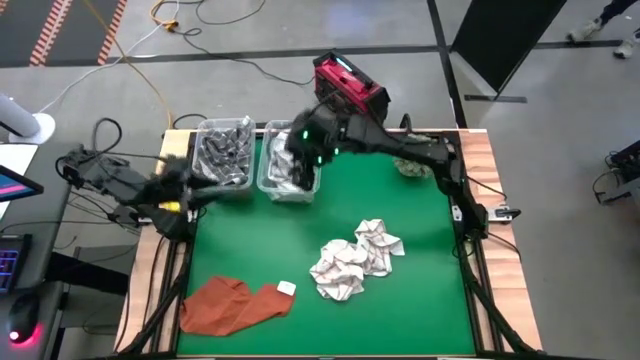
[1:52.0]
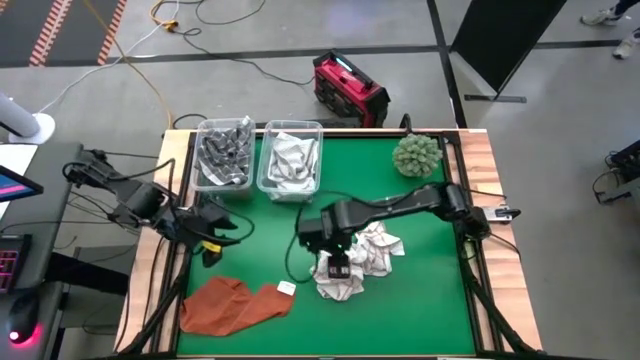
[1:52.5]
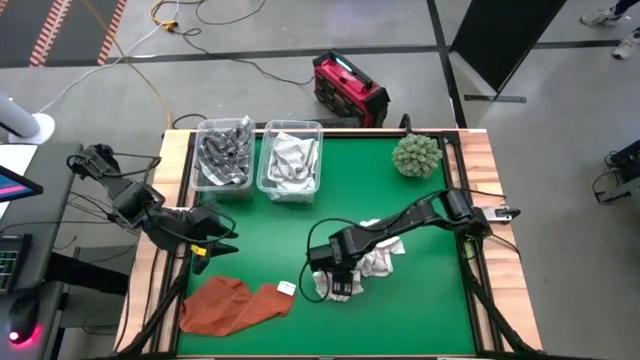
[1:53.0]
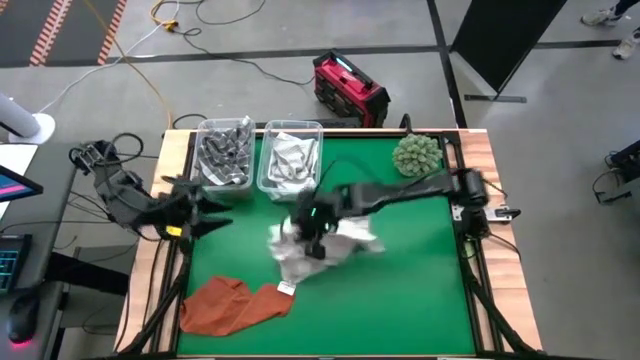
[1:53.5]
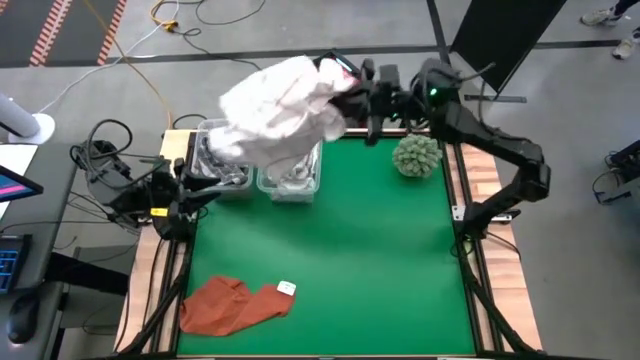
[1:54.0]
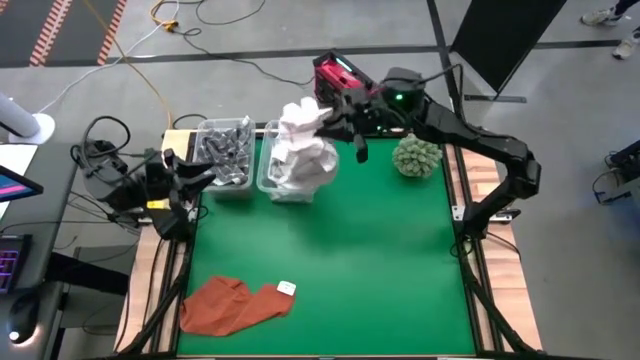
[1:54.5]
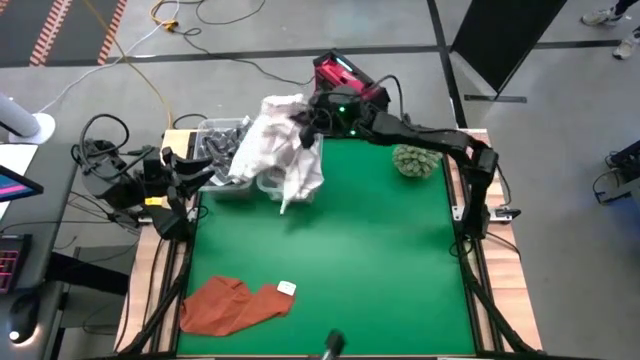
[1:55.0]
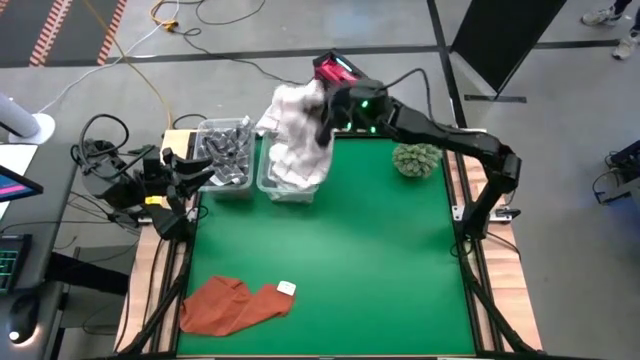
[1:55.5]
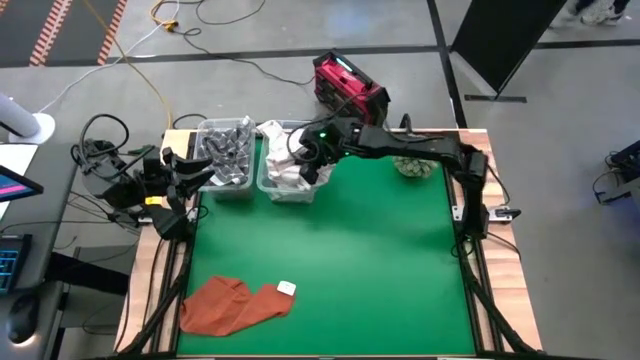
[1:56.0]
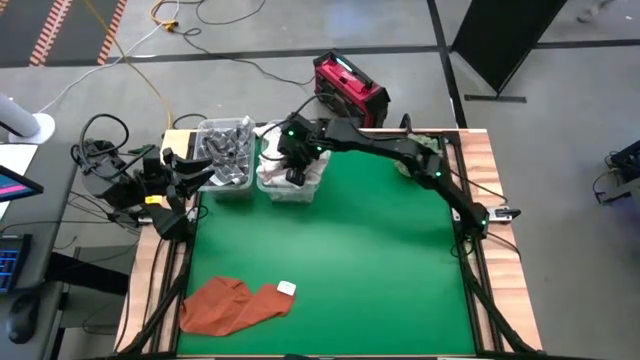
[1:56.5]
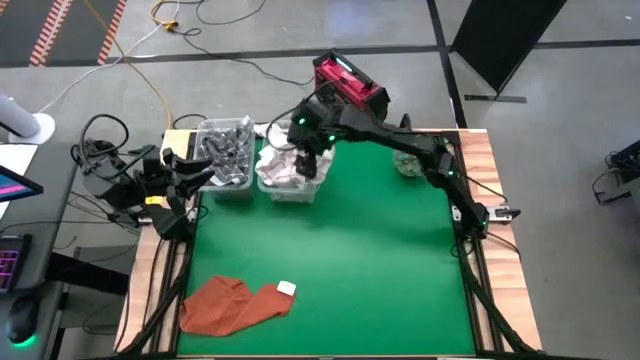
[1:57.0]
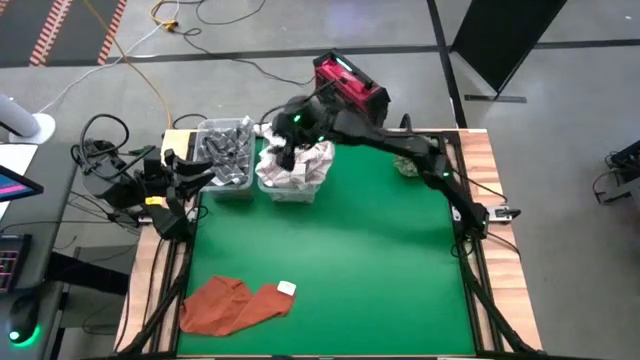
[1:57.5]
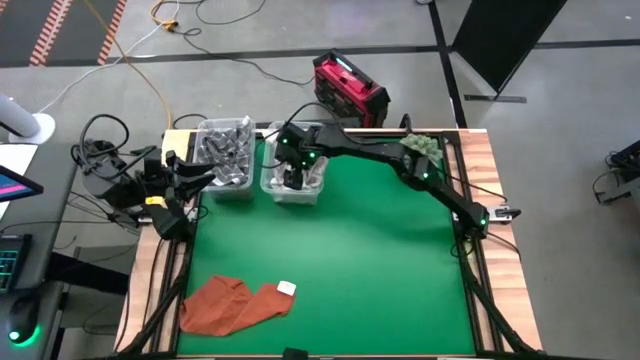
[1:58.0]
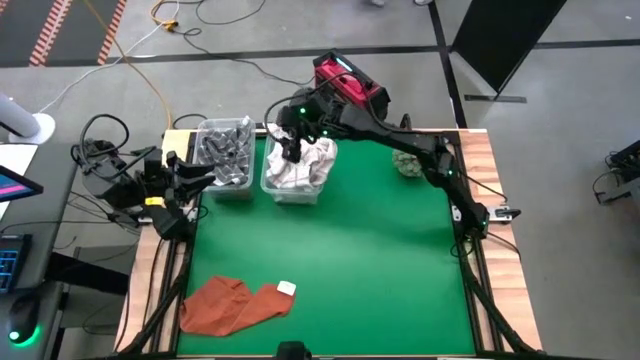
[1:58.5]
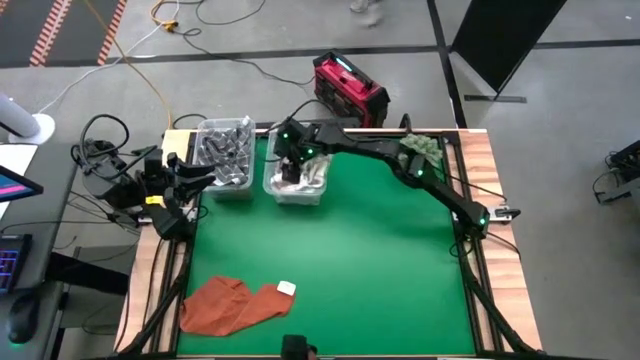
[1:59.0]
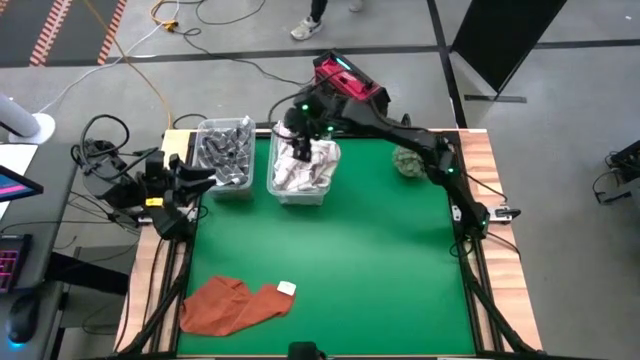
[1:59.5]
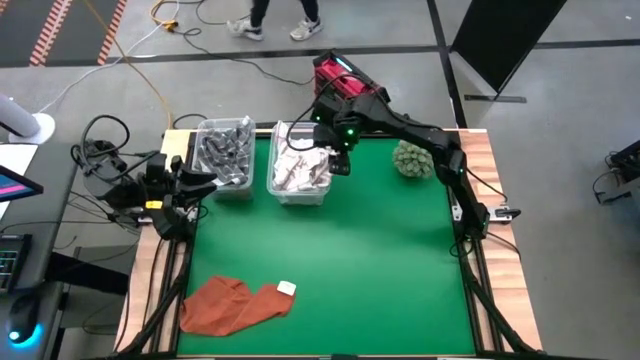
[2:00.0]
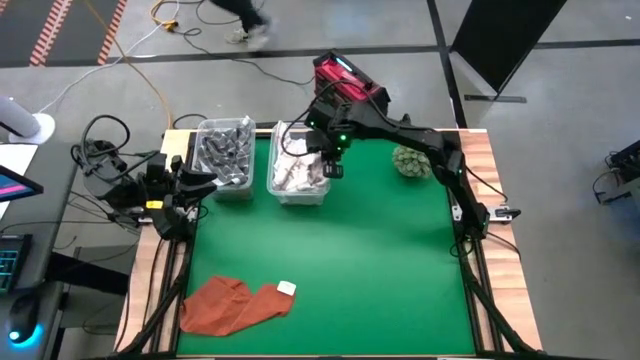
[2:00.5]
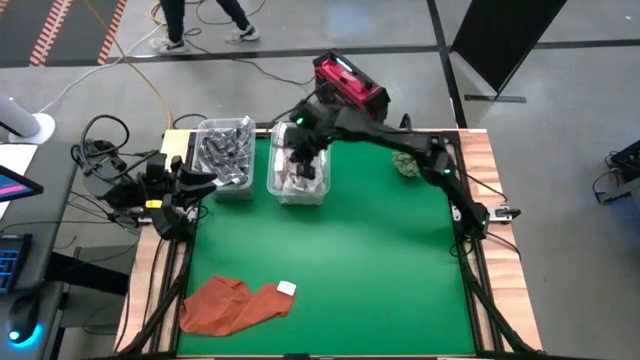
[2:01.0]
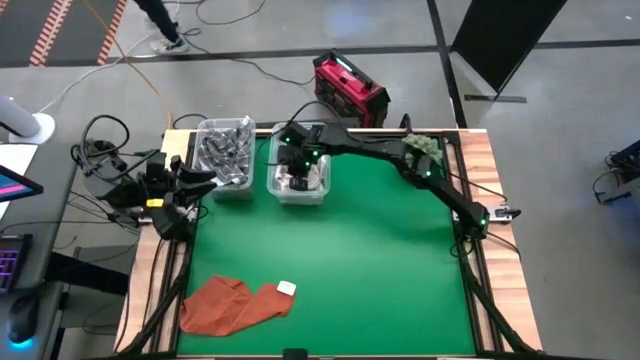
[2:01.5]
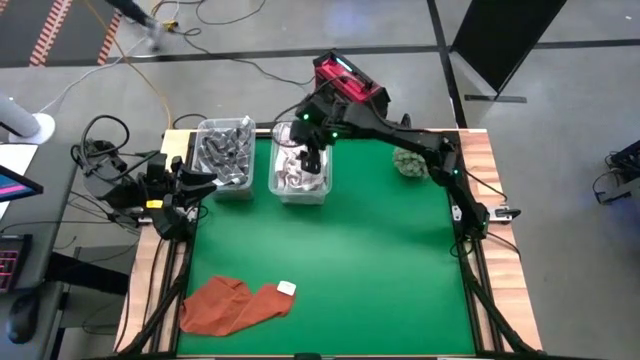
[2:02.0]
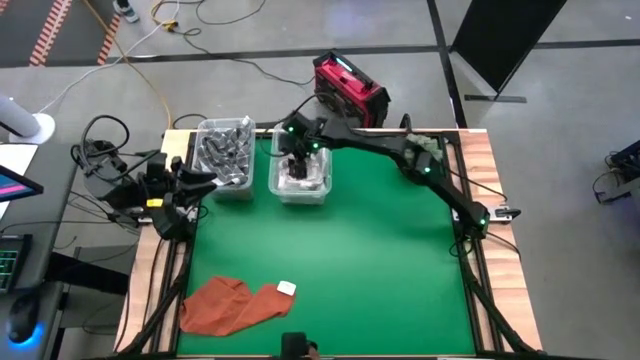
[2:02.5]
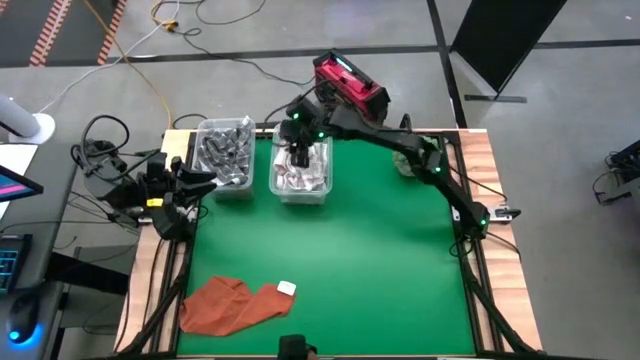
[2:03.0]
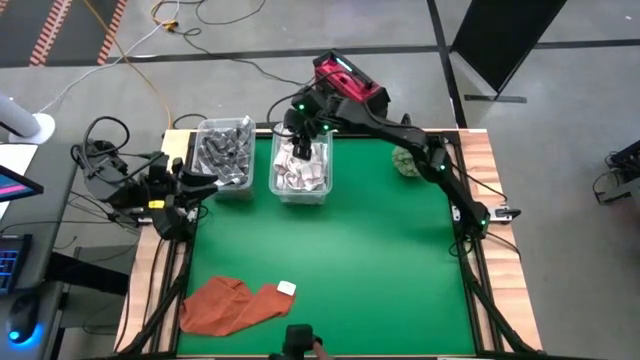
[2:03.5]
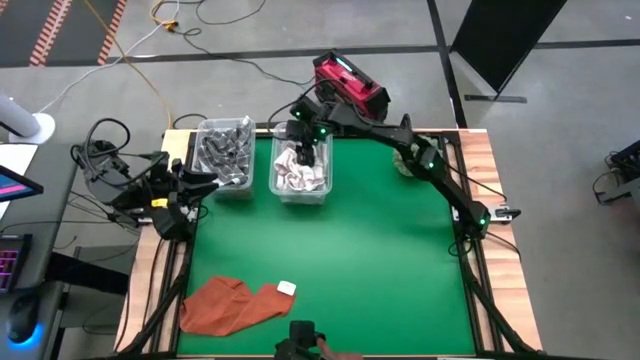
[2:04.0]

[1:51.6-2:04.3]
Task: Sort towels by color in basket
Put the white patterned towel into the right transparent bin

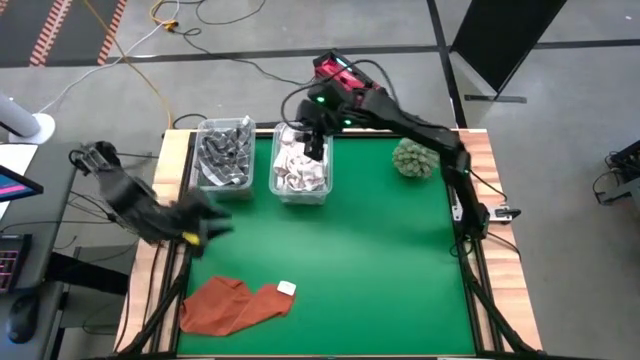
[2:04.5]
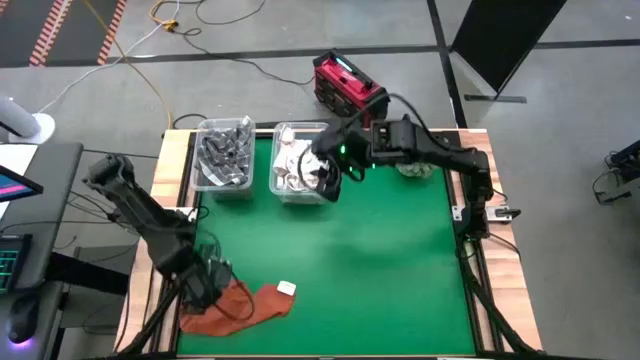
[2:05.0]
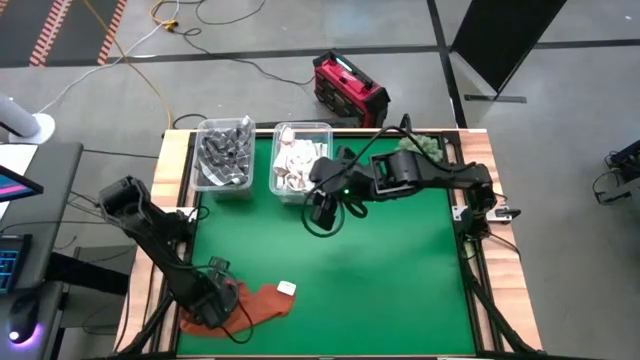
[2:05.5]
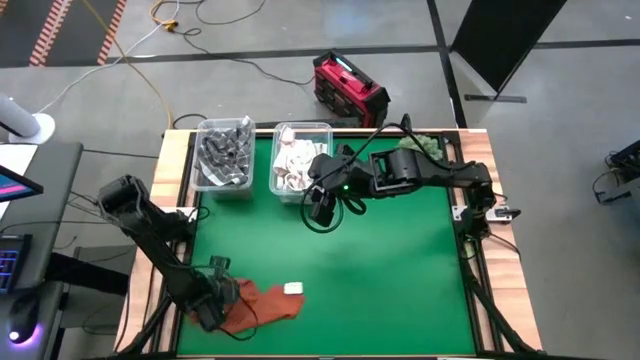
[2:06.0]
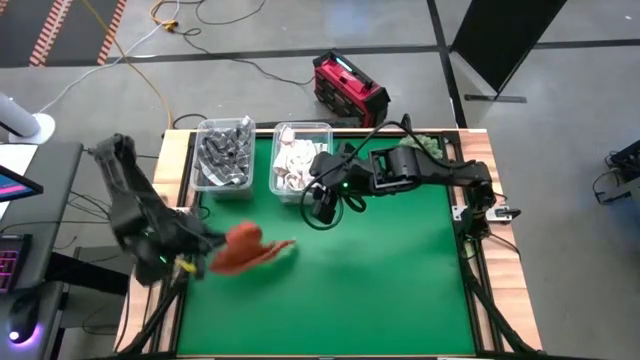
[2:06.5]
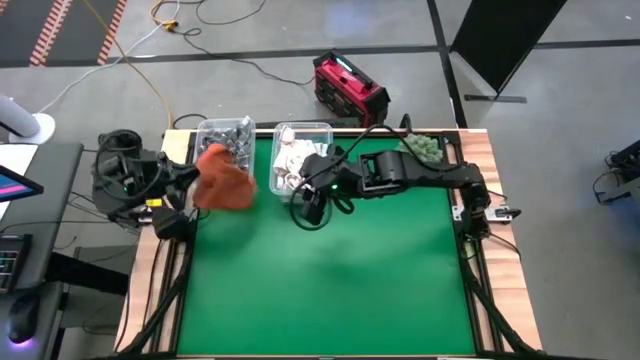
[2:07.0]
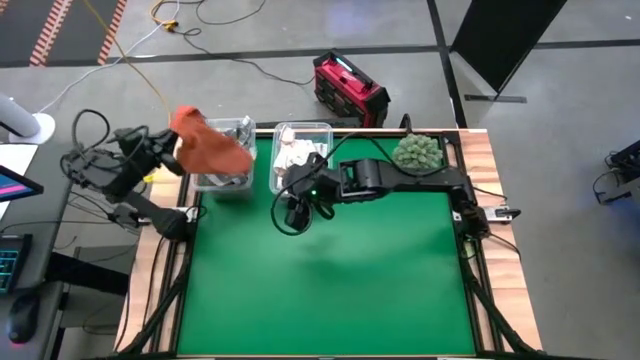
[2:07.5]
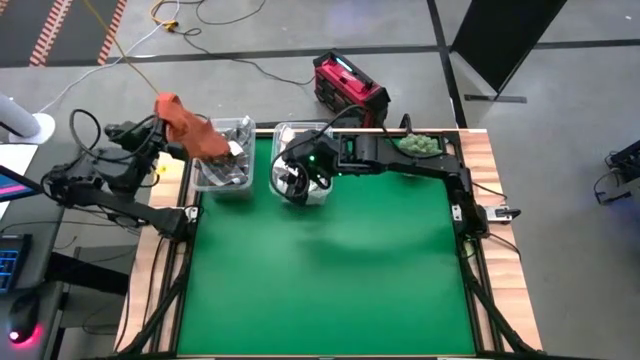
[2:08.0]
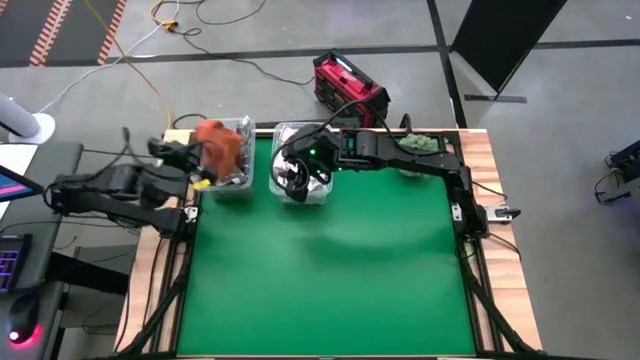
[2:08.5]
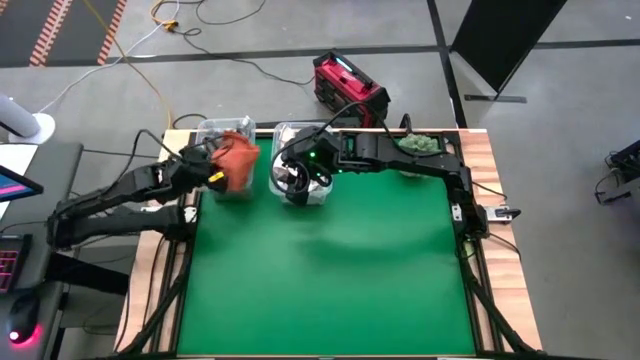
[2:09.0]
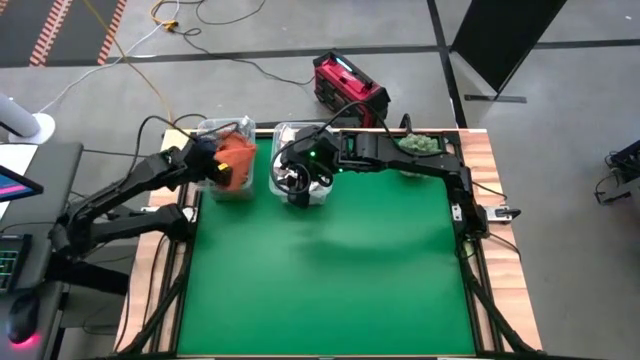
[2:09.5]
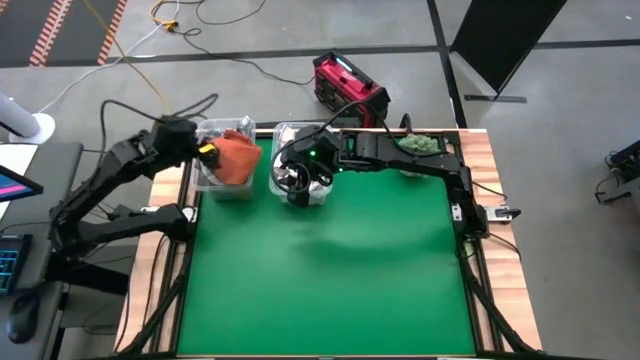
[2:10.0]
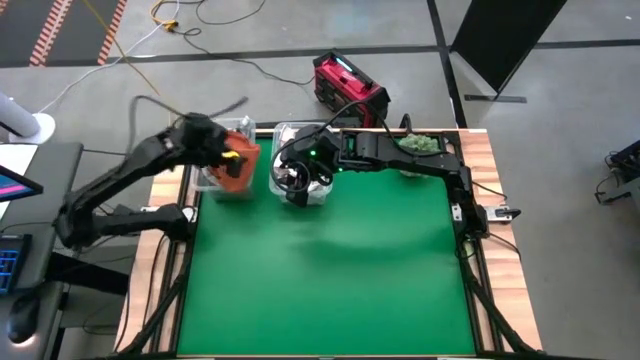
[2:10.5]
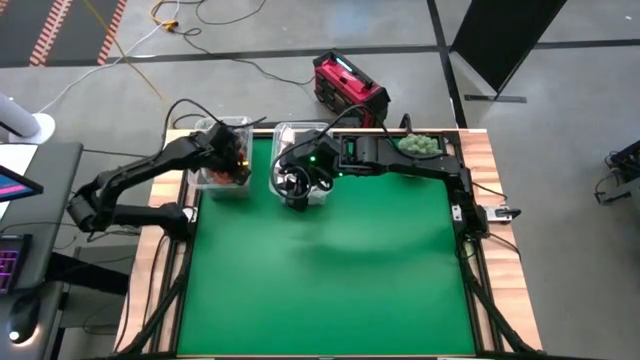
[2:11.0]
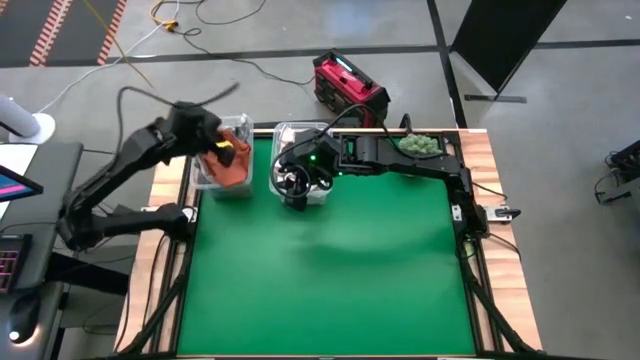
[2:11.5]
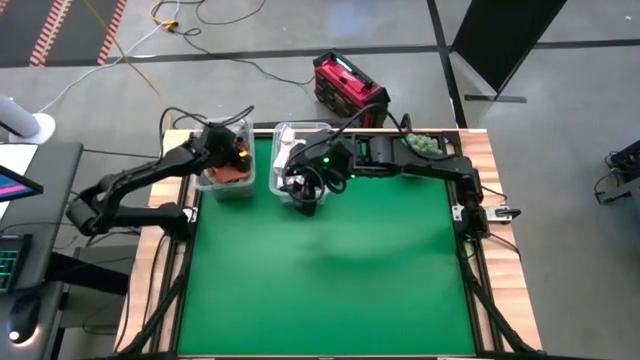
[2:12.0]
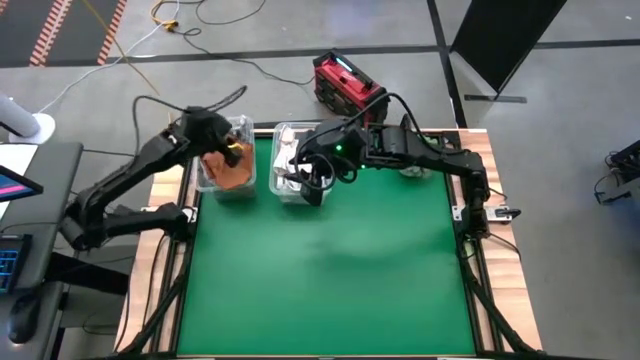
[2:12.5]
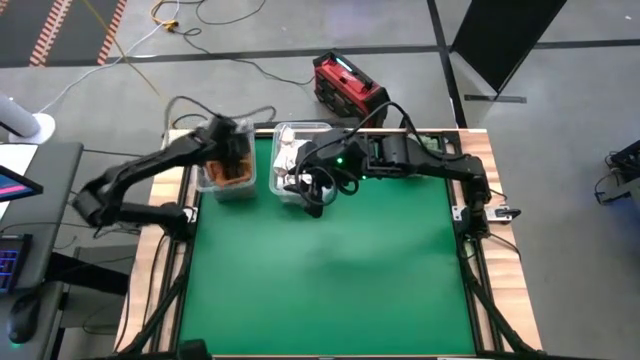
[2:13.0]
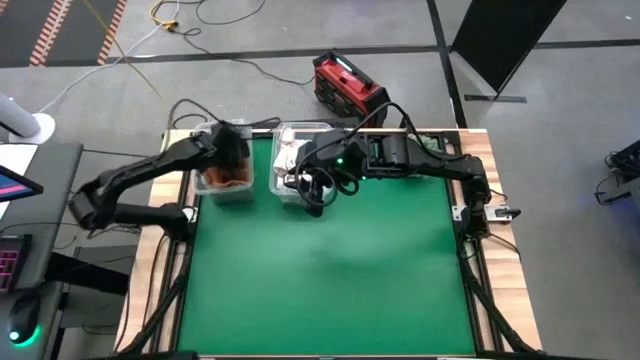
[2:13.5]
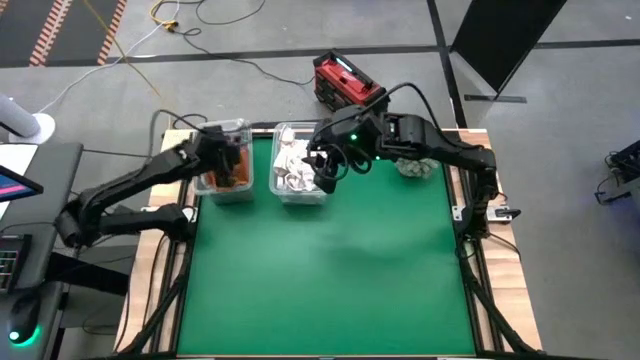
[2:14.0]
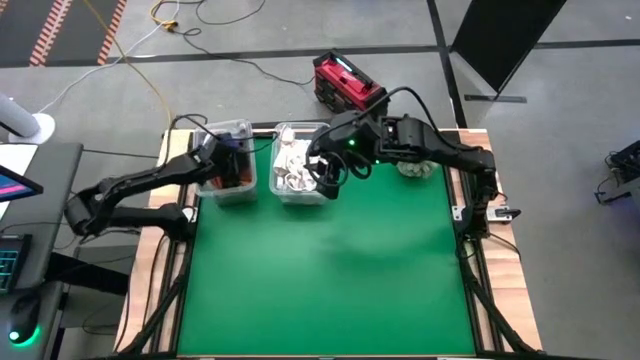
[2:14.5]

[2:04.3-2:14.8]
Put the orange towel into the left transparent bin
